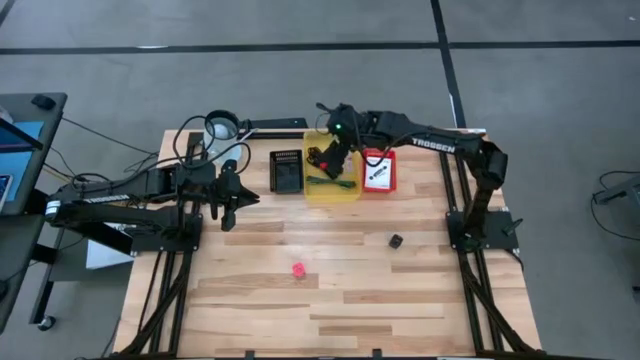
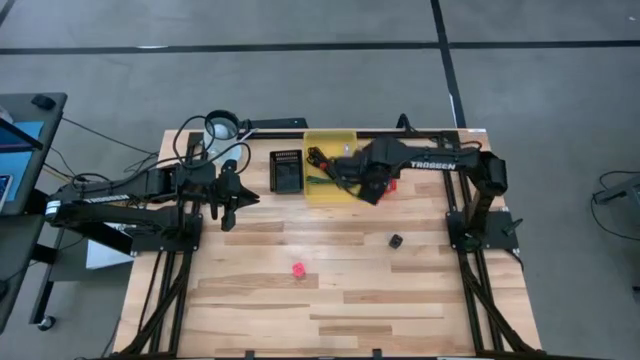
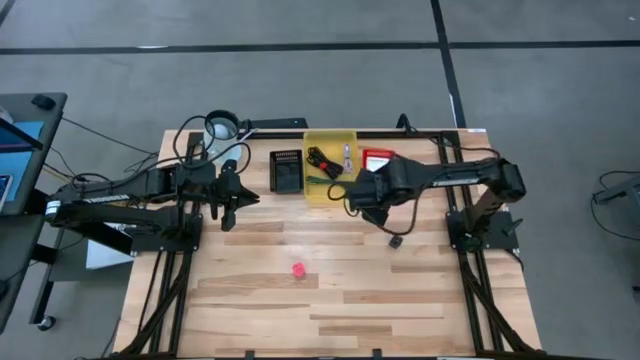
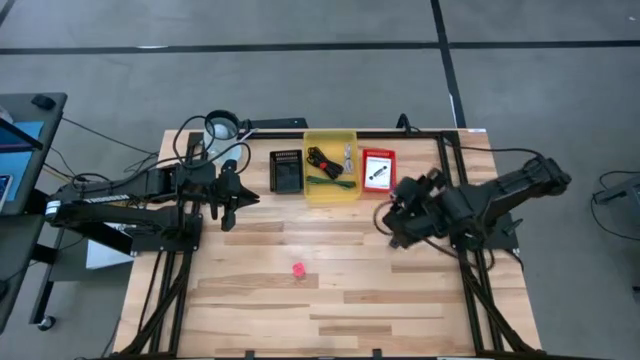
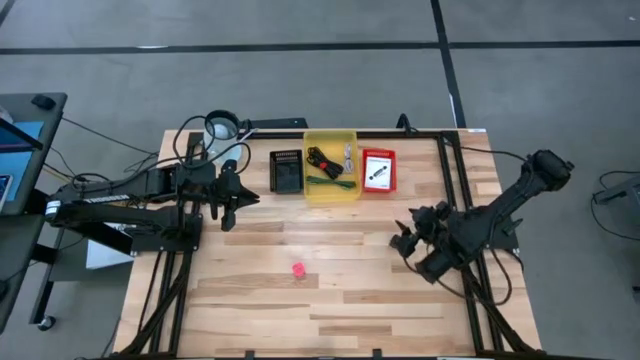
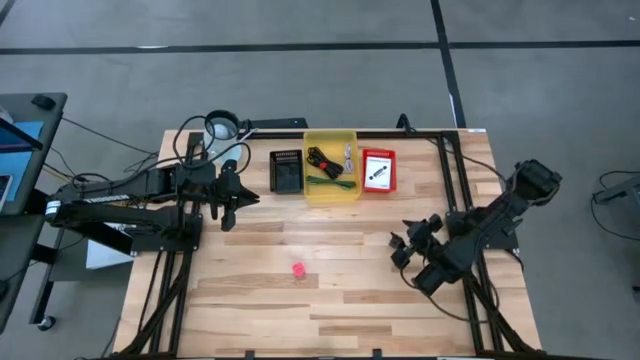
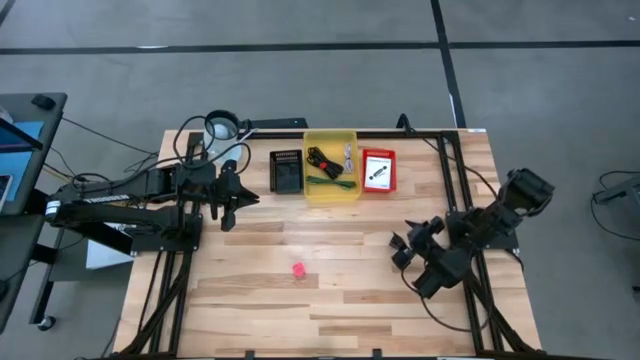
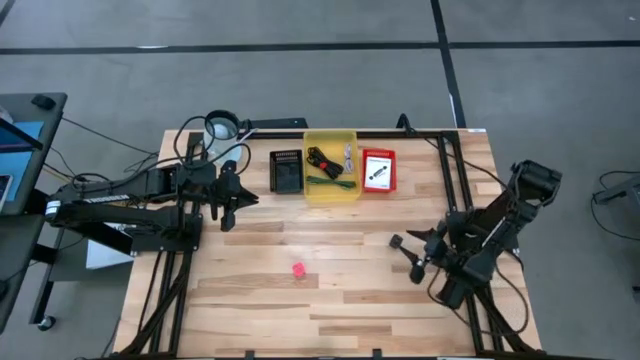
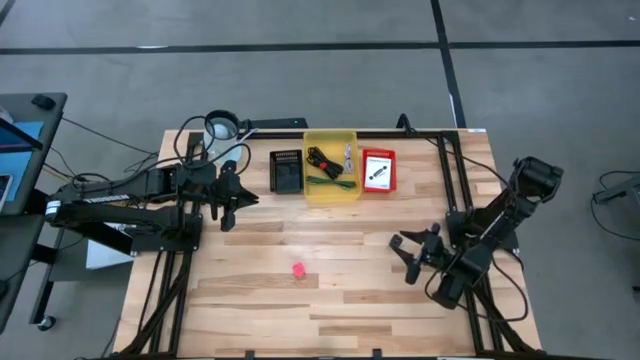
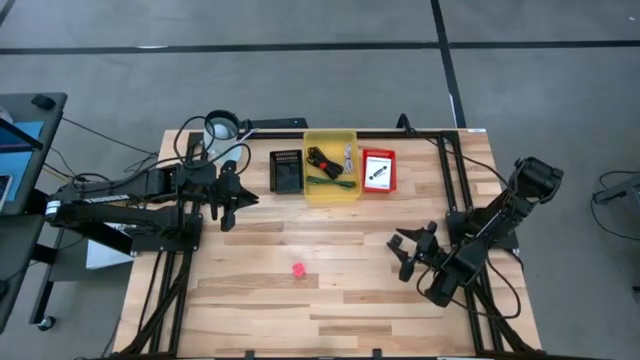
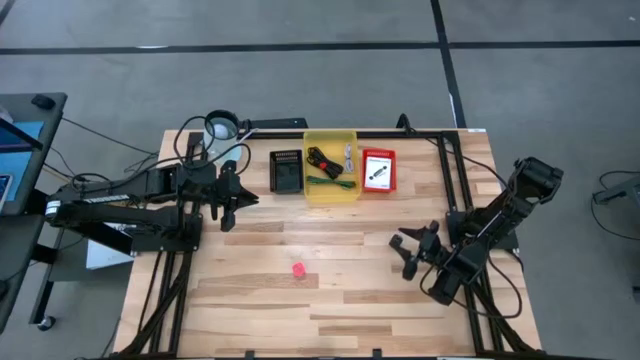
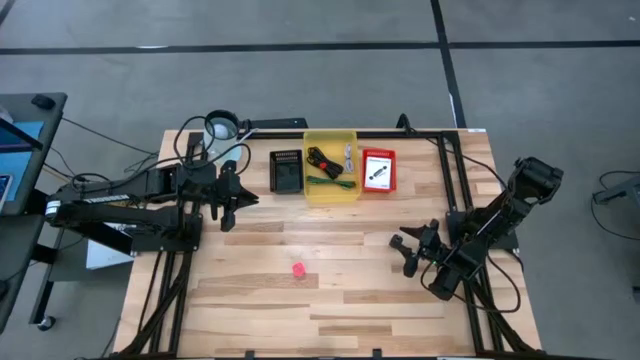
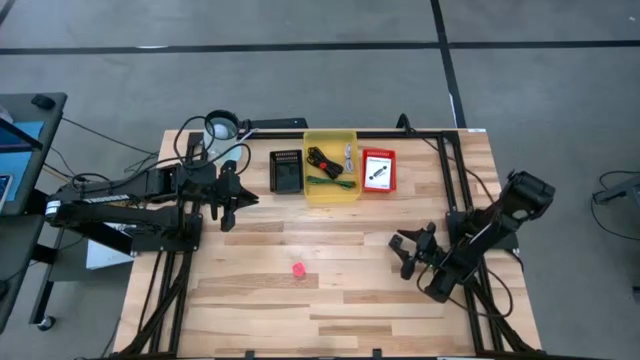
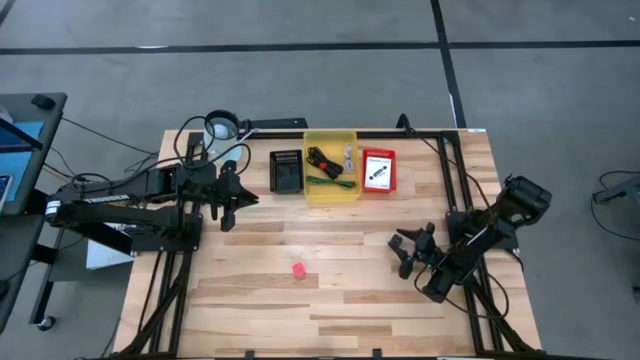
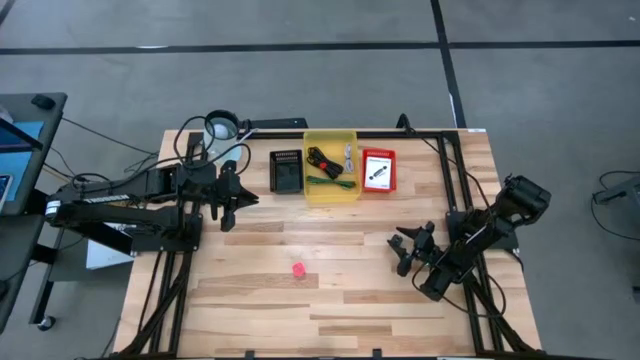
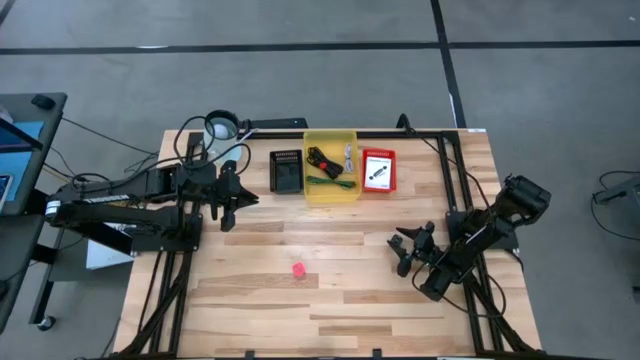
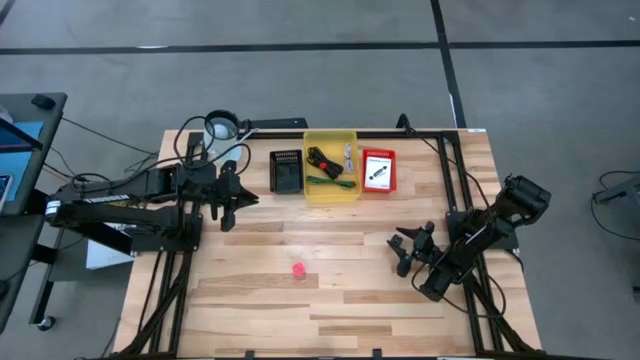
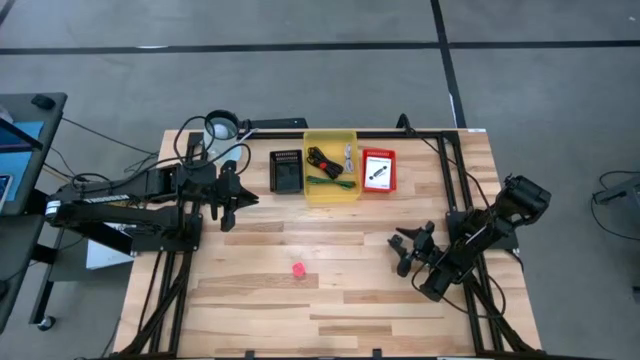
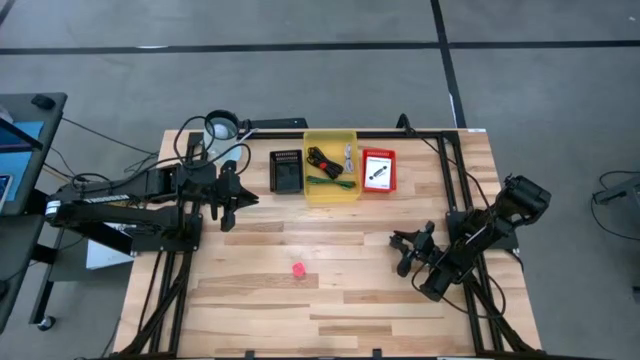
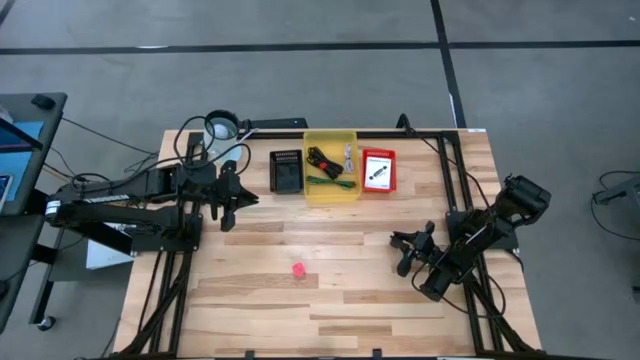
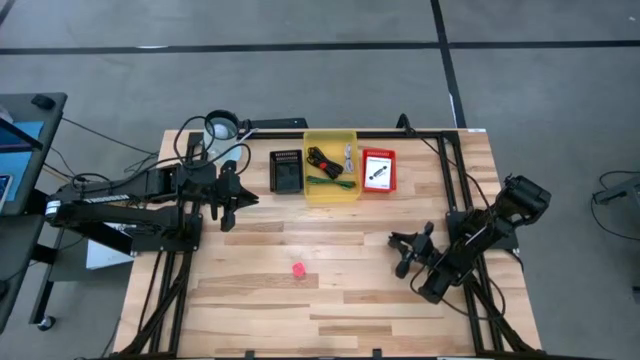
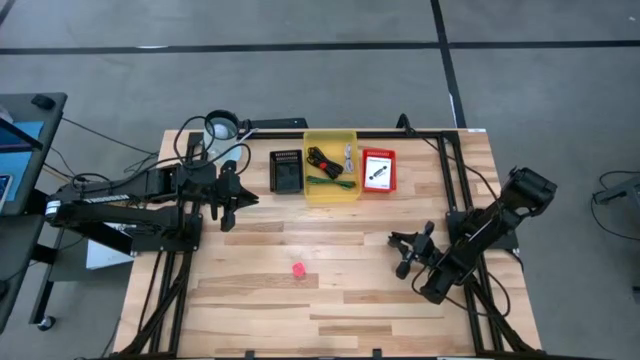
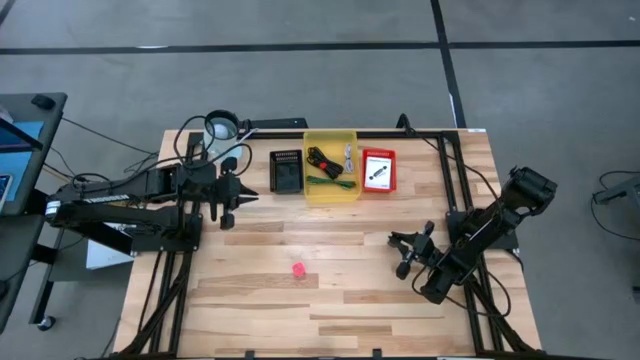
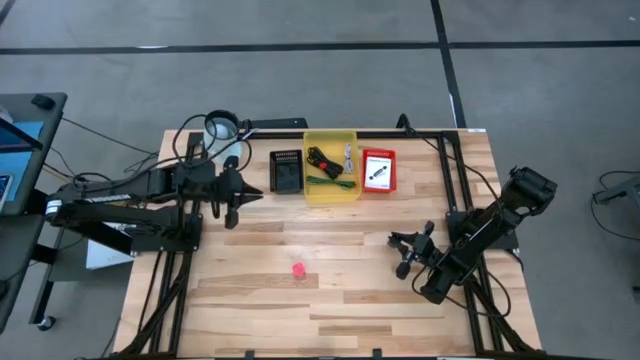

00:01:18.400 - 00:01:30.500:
Task: Pick and place items into bin
Put the black charger adapter into the black bin

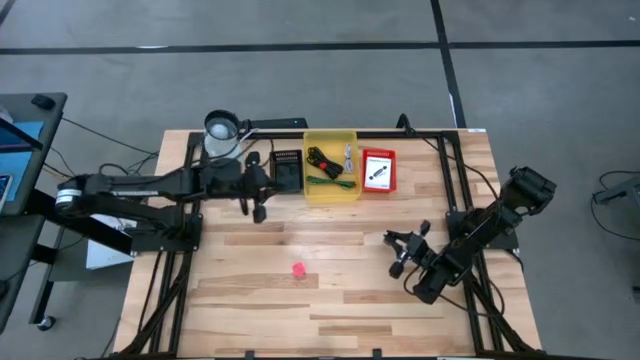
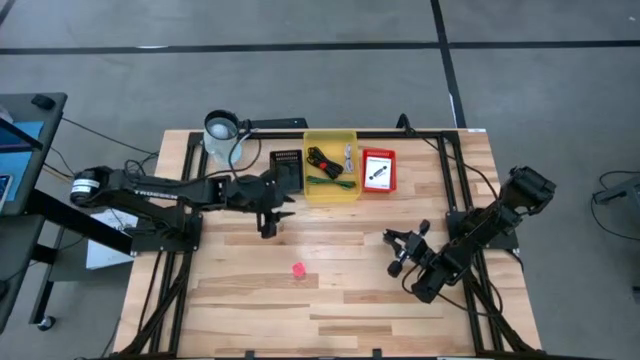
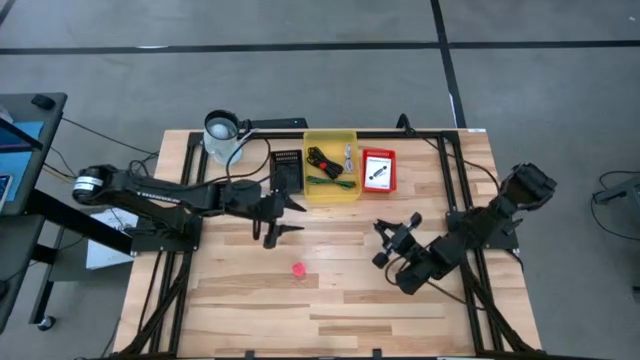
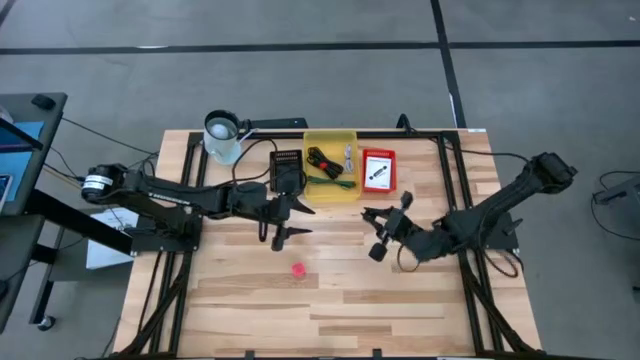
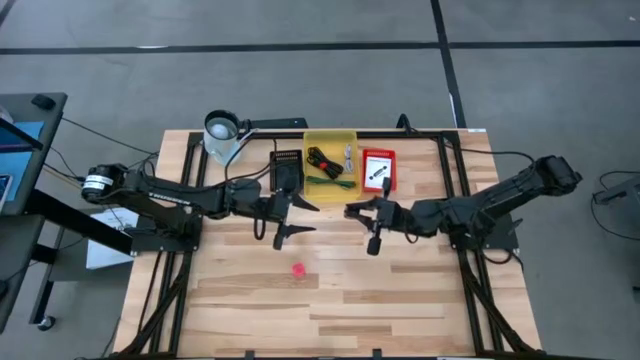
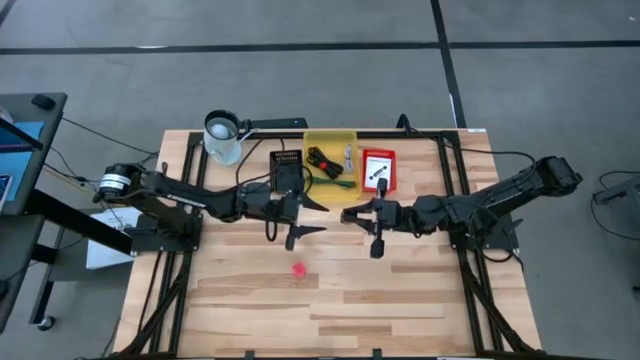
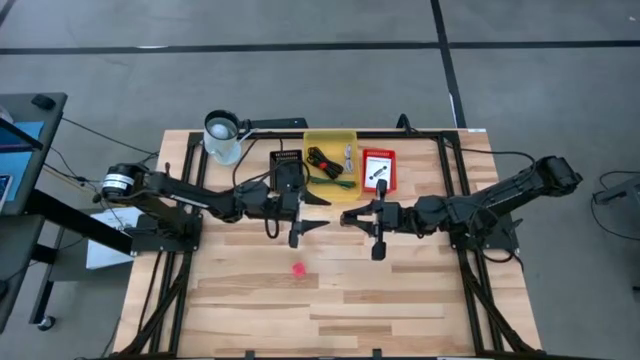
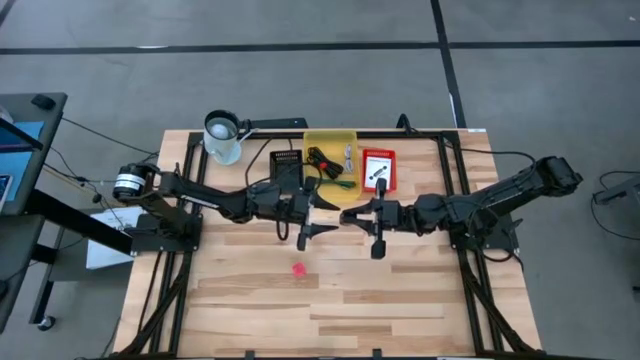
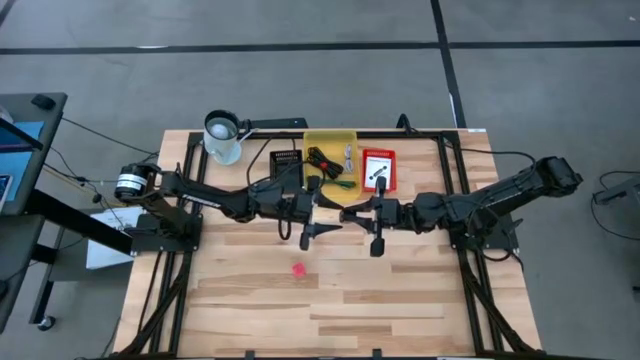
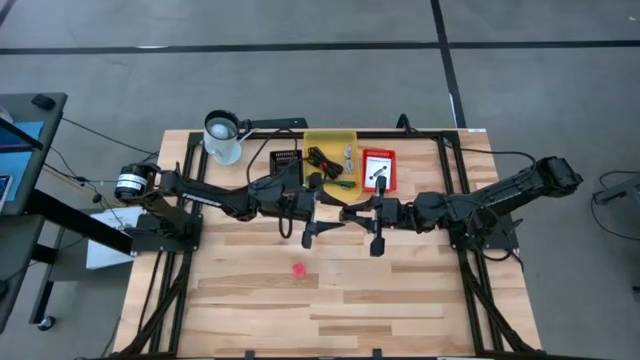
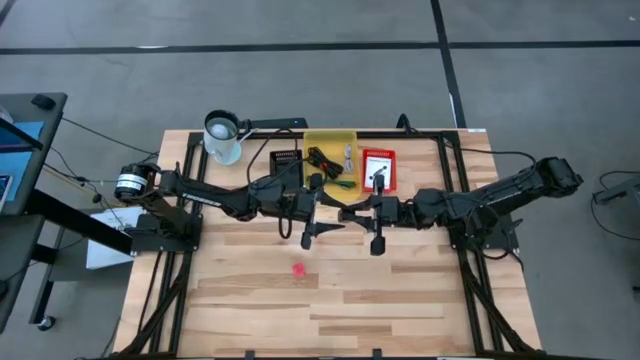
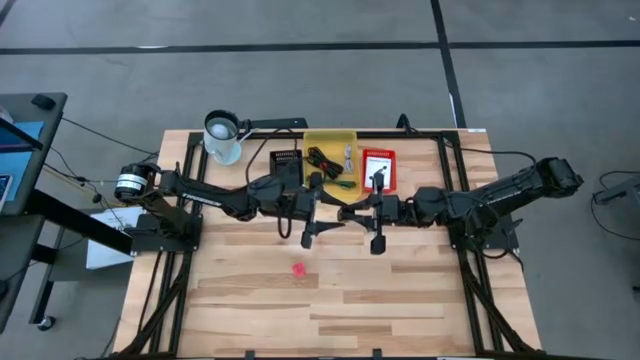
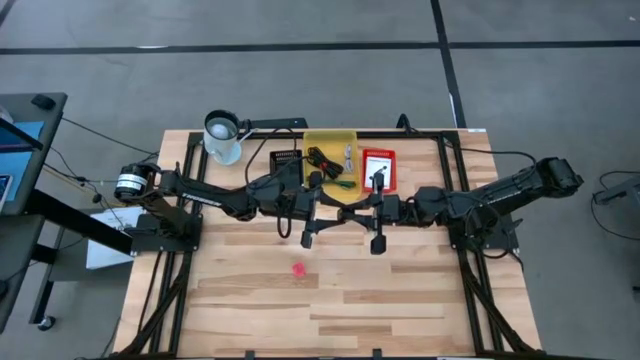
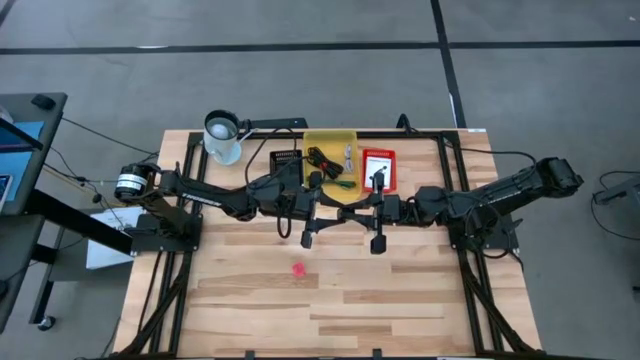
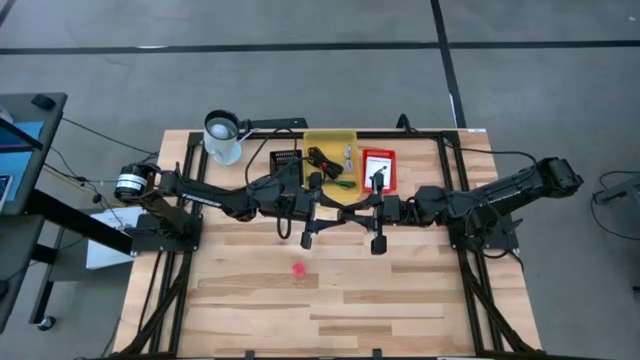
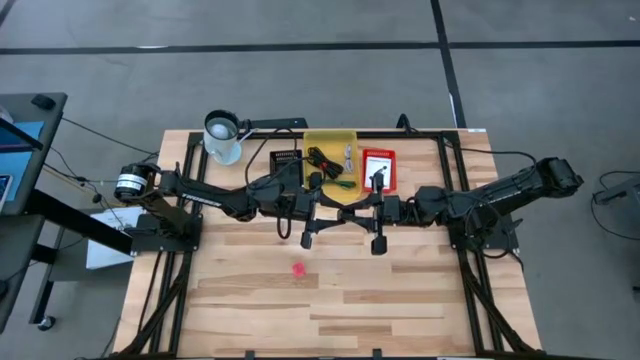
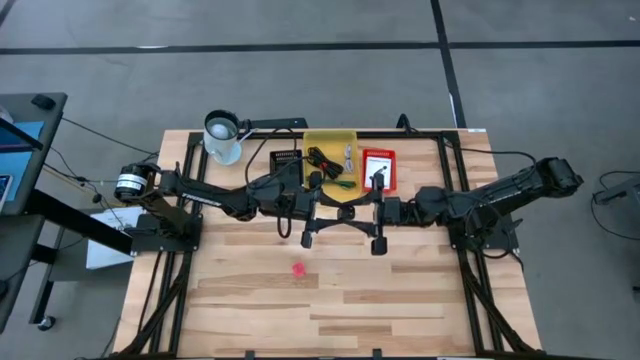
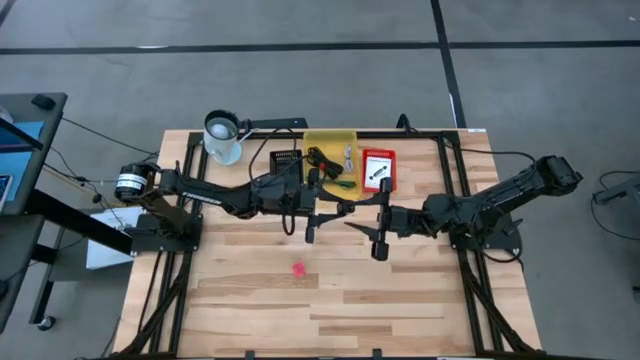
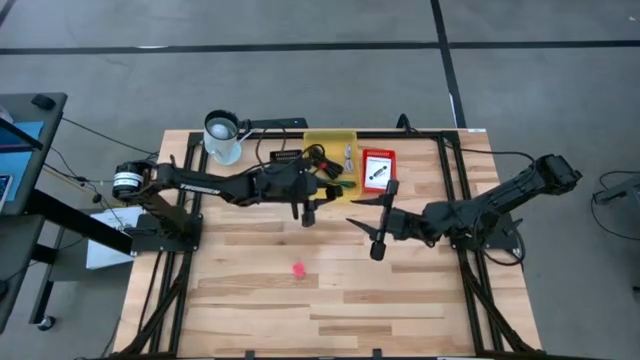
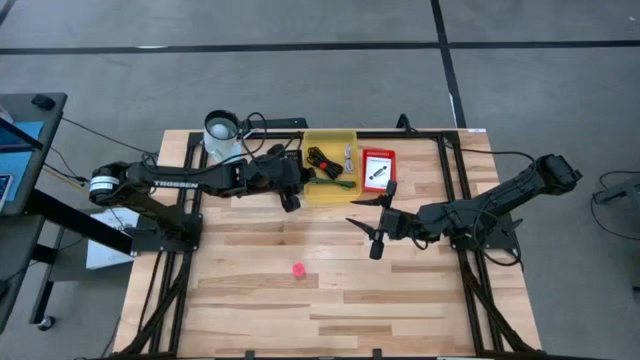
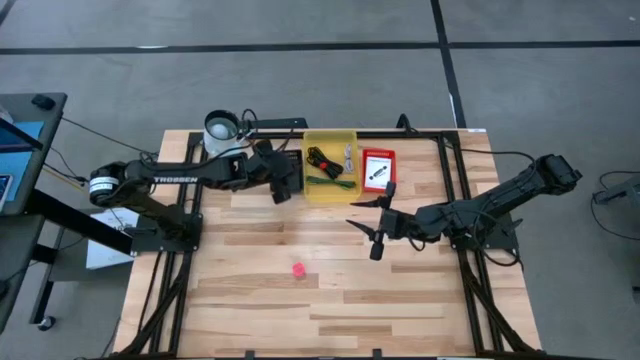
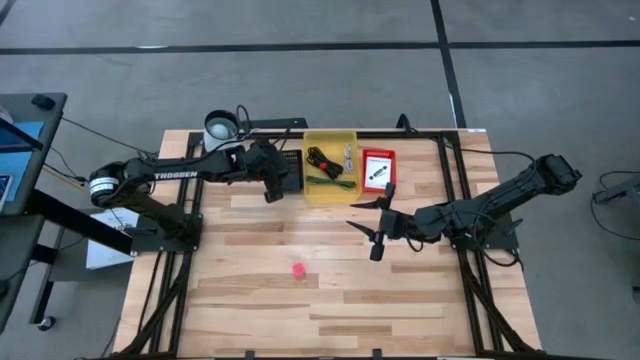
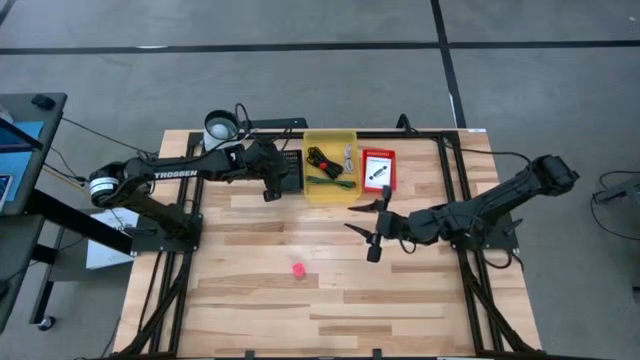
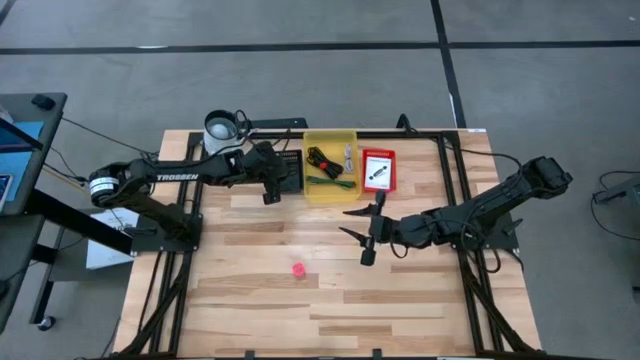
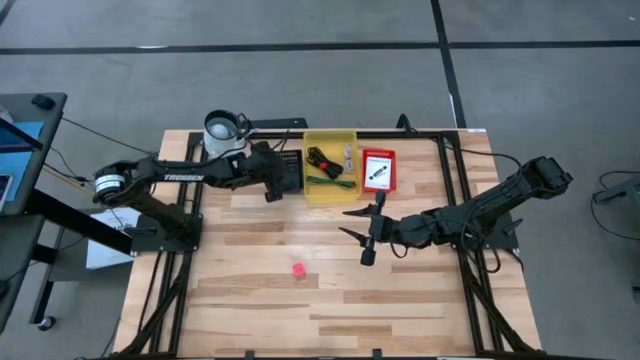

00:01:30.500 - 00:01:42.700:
Put the black charger adapter into the black bin
